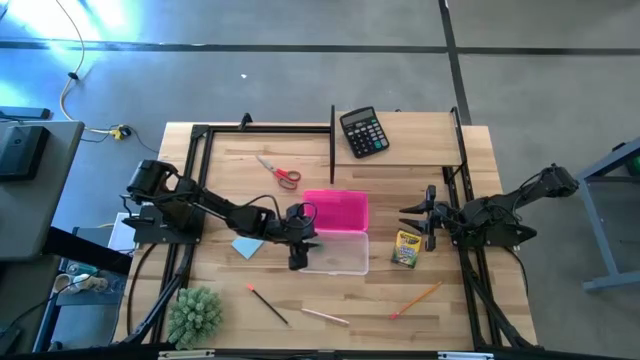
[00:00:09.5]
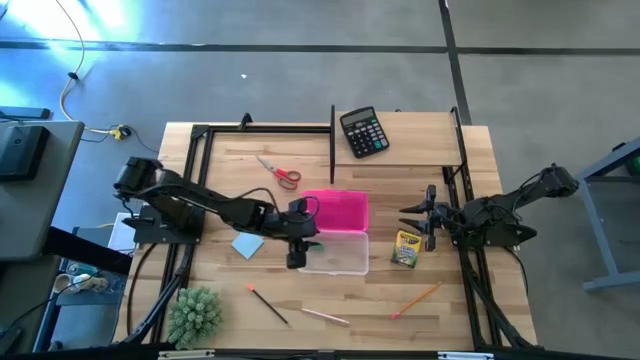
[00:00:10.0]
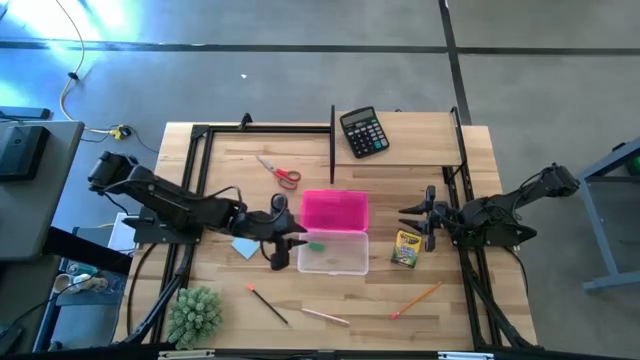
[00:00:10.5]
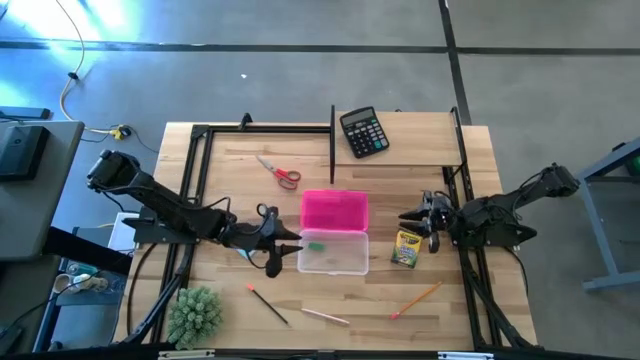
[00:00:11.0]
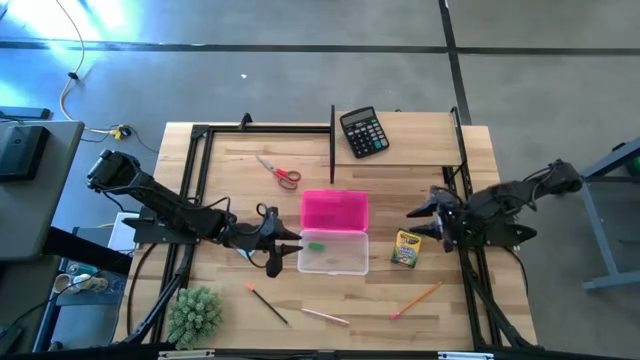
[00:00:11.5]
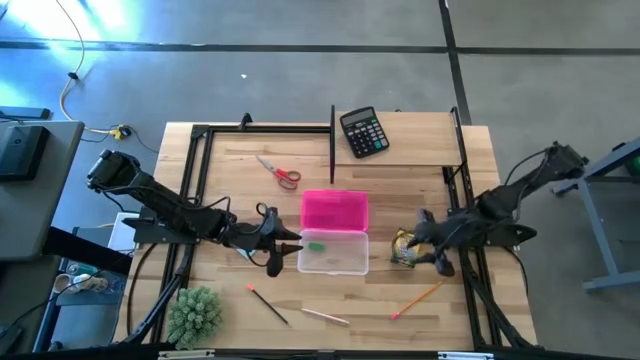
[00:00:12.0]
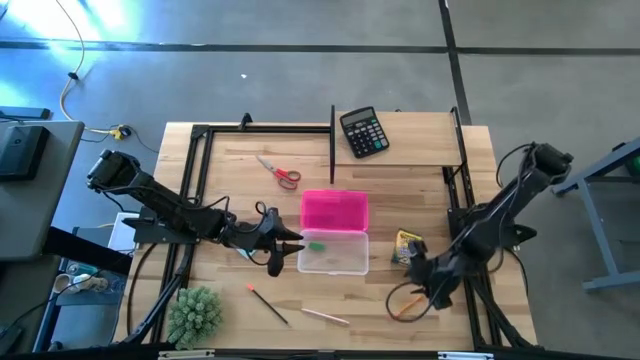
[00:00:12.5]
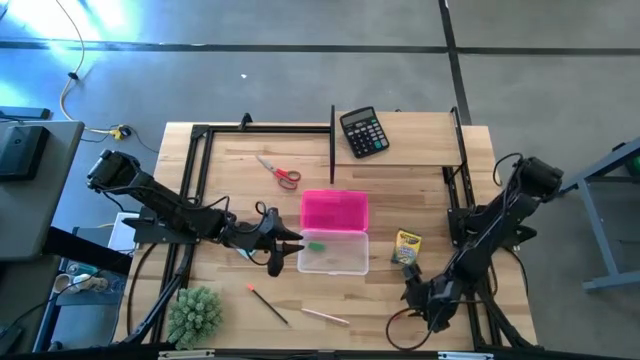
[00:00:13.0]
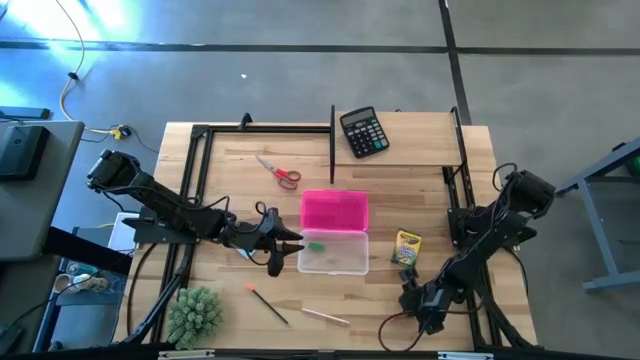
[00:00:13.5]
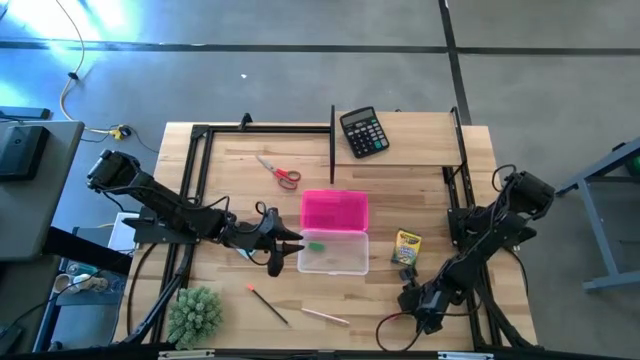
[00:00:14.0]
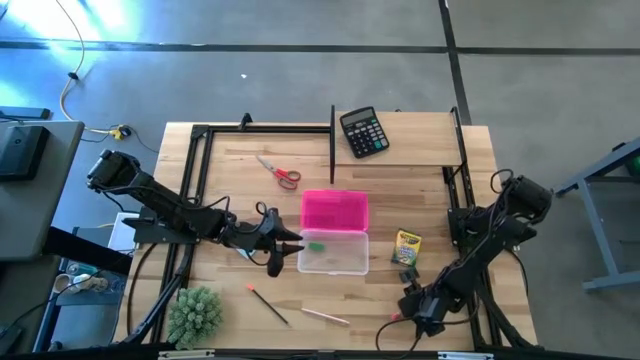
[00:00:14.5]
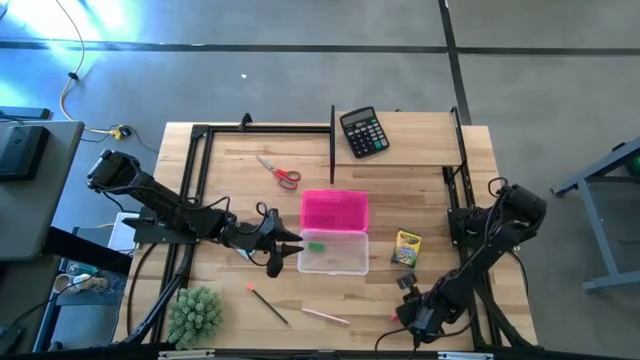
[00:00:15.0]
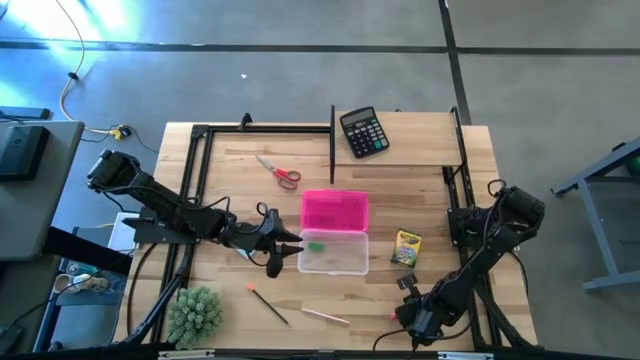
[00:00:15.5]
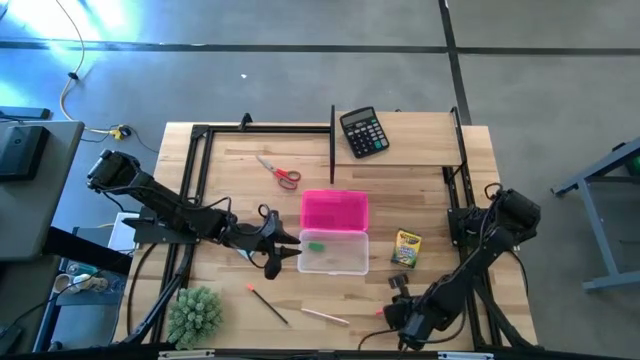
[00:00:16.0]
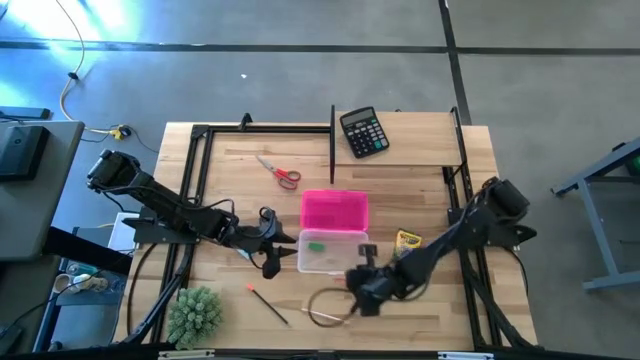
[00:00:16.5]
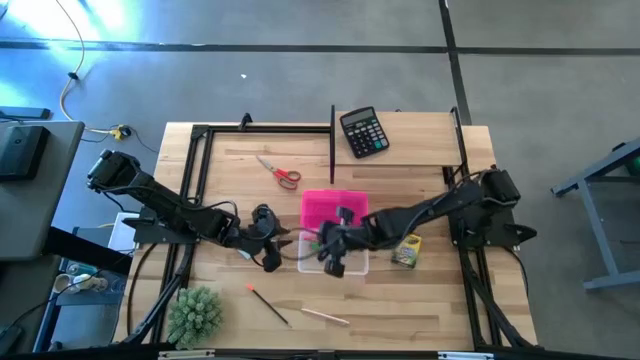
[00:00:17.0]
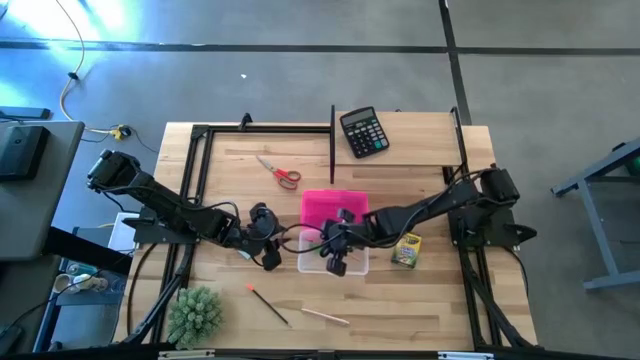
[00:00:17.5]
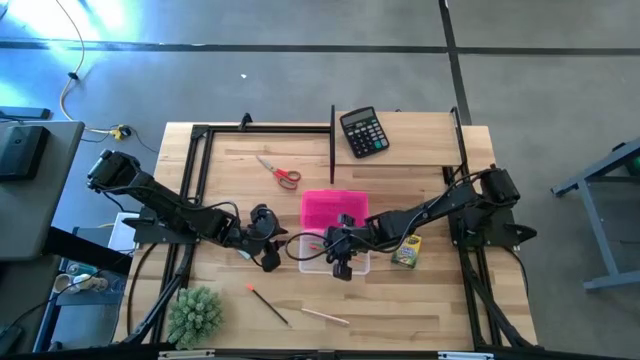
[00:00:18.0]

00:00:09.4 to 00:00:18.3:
Task: Pack school essentials
Put the yellow pencil into the pink supply box

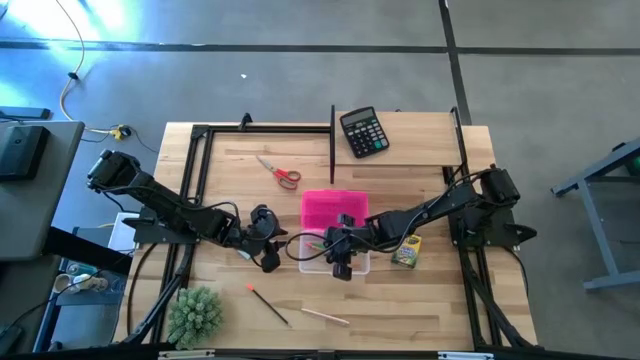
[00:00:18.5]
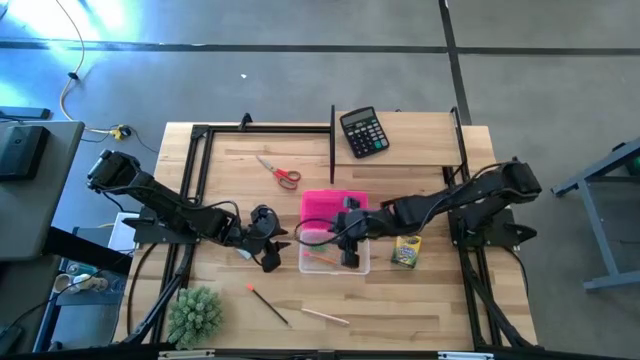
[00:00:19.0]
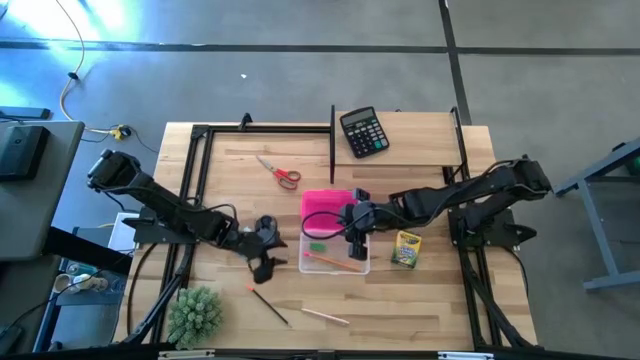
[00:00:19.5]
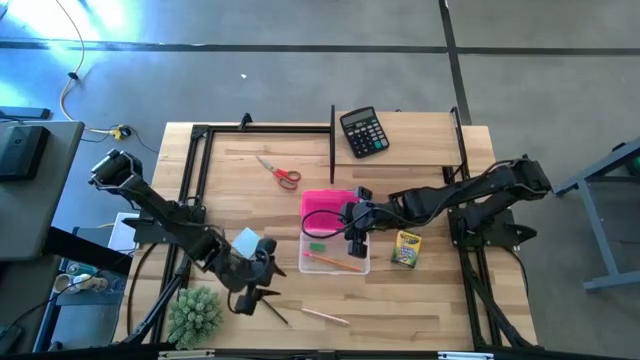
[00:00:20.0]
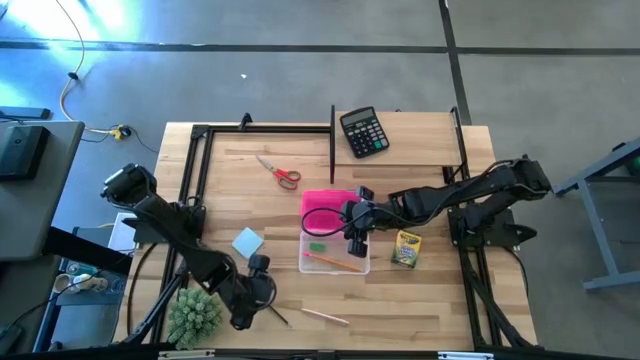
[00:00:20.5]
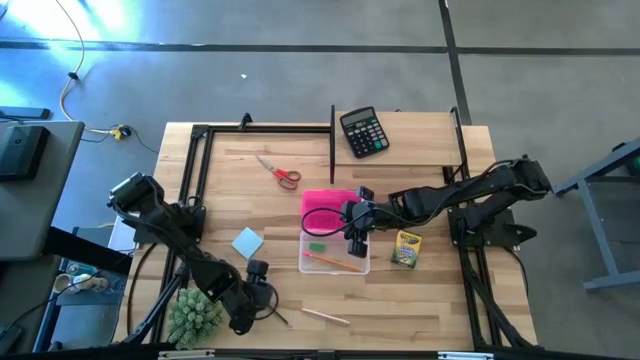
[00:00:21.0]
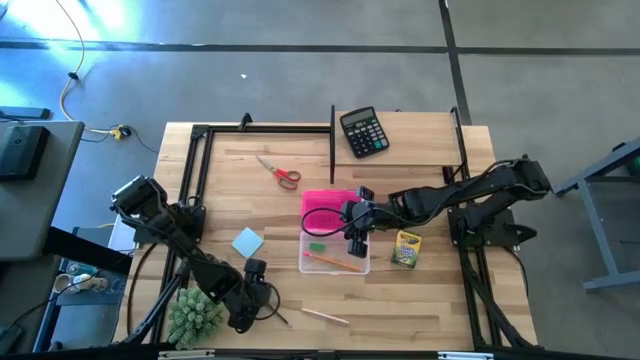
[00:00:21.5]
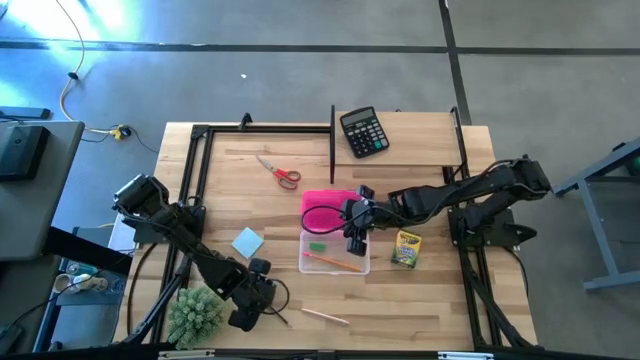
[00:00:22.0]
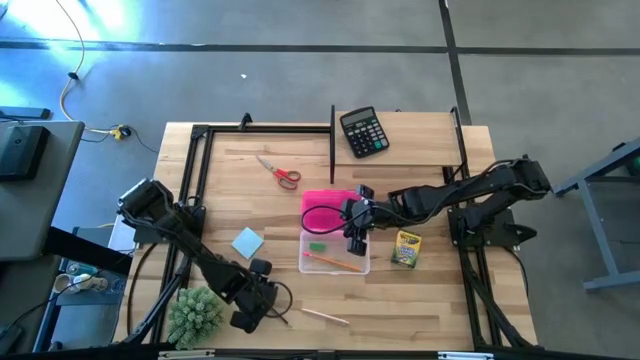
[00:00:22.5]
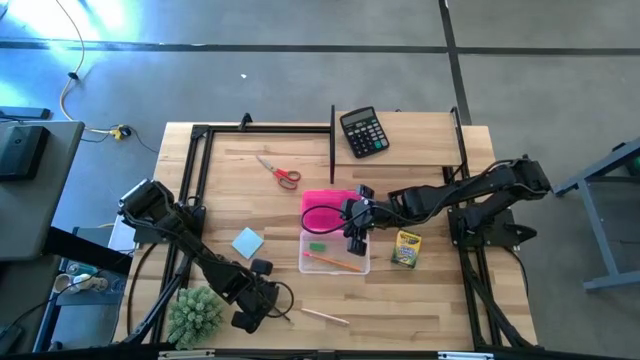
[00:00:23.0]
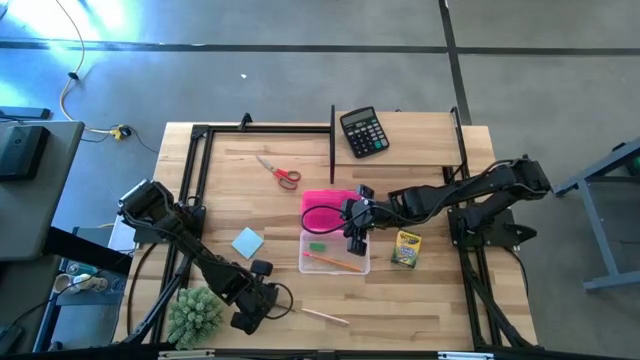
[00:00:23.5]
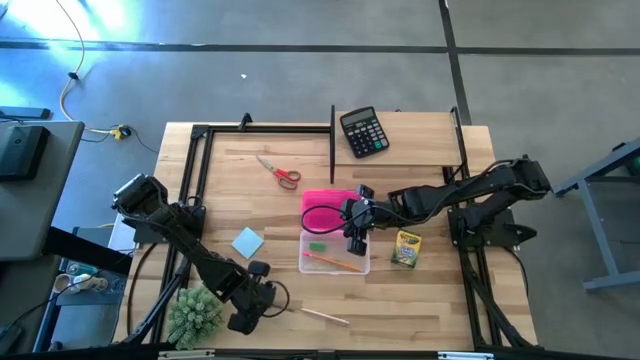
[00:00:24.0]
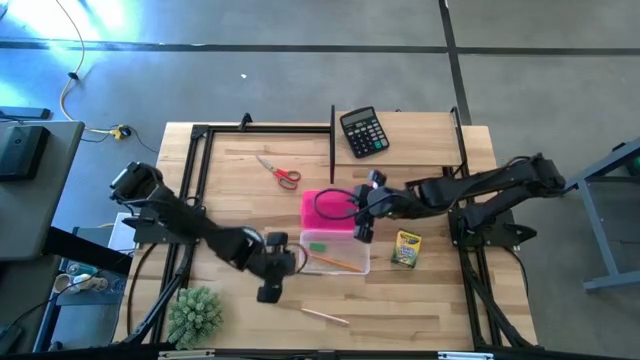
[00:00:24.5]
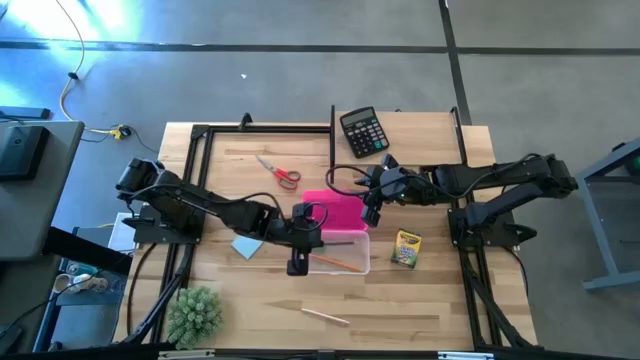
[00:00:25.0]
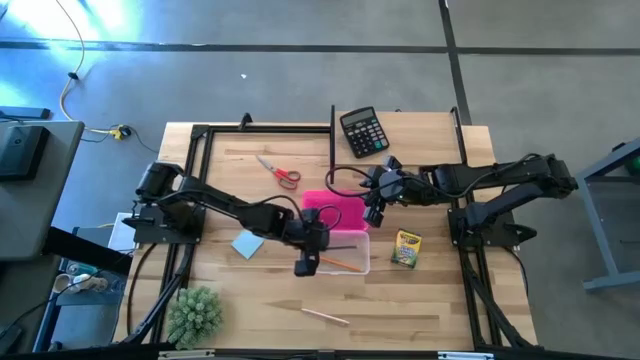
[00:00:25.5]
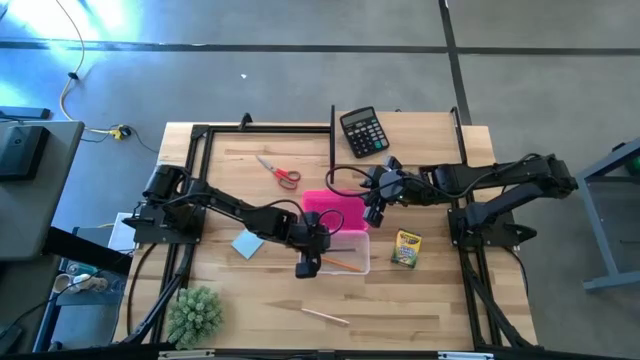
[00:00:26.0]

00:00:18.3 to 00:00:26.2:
Put the black pencil into the pink supply box

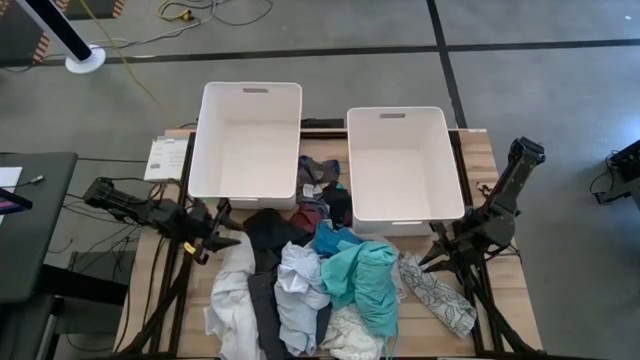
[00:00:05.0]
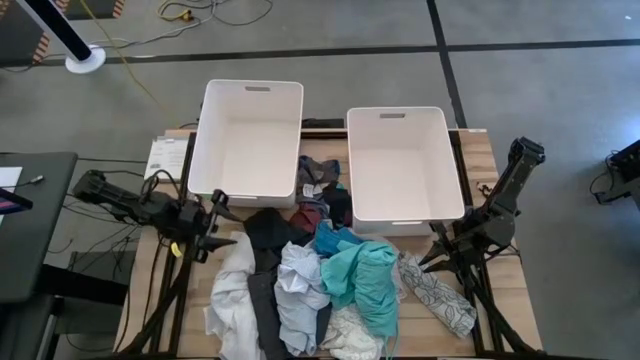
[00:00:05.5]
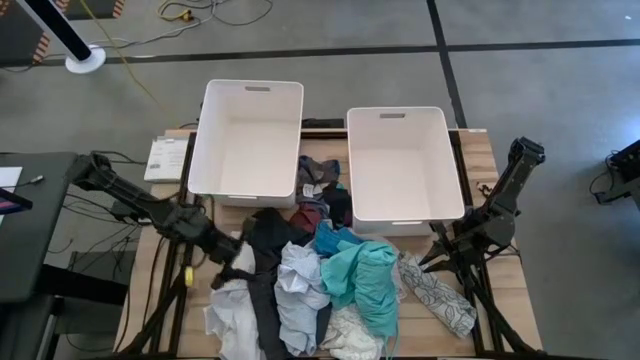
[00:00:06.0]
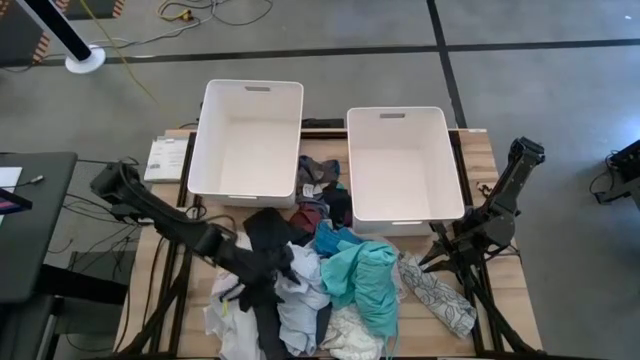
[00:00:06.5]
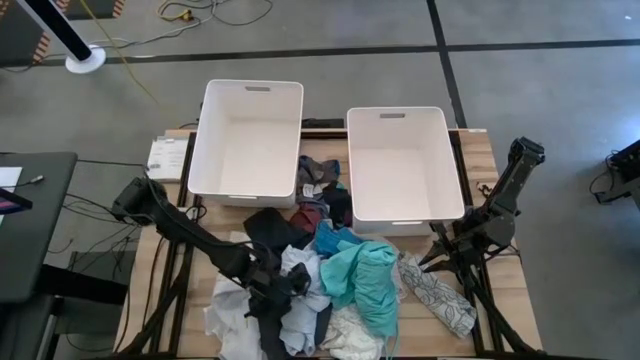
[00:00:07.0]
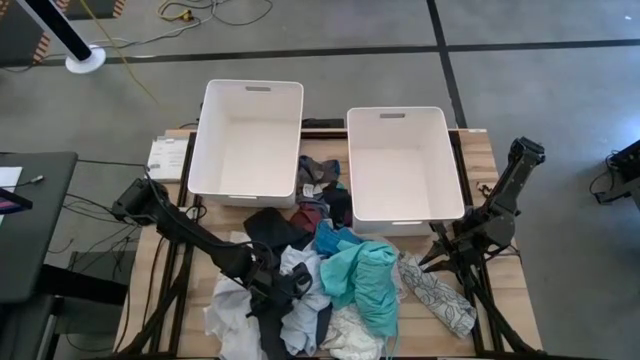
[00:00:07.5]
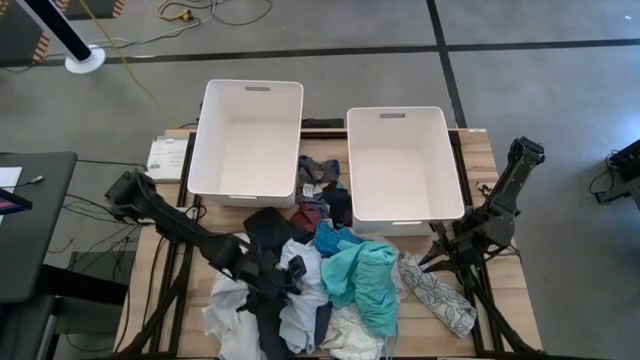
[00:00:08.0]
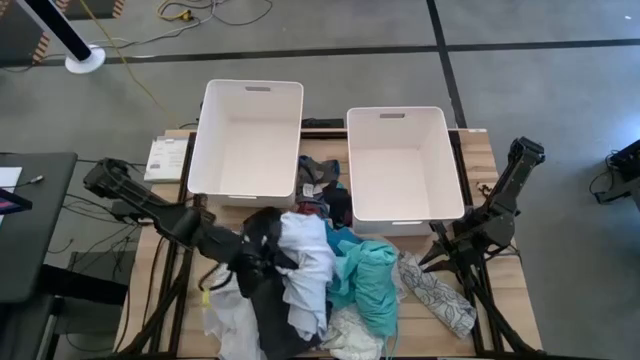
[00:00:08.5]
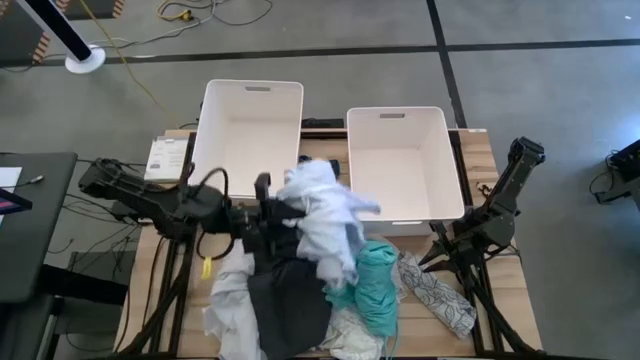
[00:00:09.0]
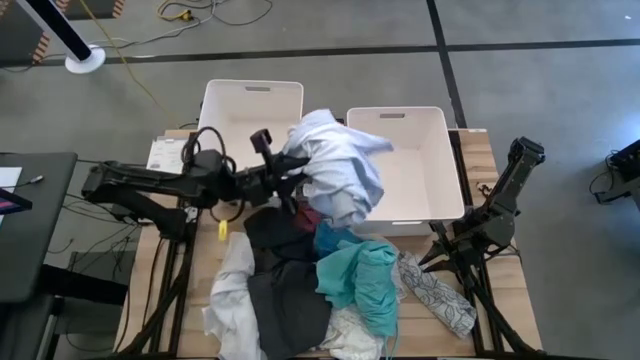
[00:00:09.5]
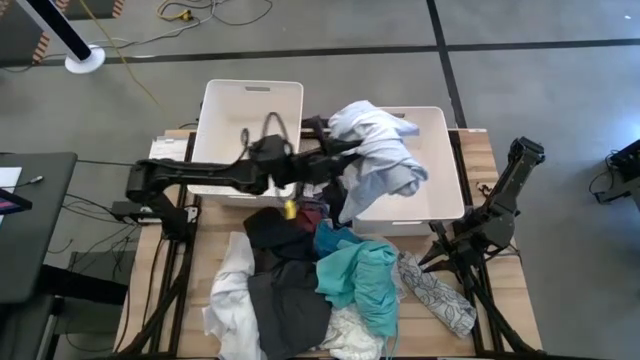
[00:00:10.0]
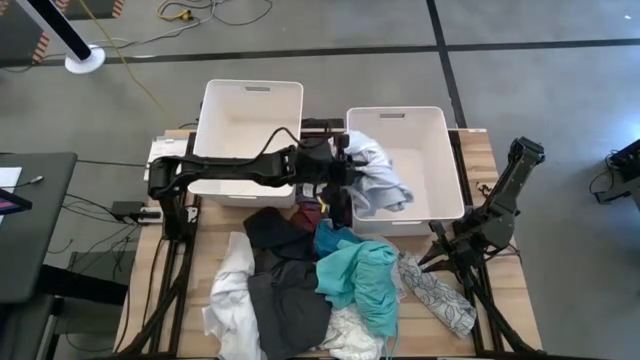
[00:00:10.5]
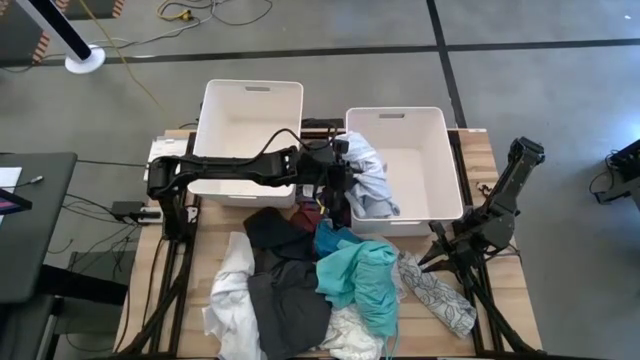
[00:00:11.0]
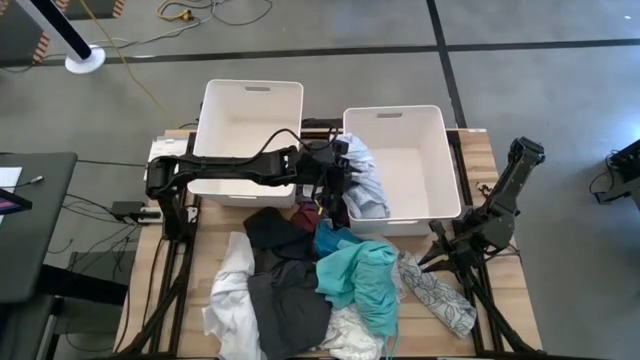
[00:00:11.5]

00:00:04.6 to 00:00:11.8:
Task: Sort clothes
Put the white-blue patterned shirt into the right white laundry bin
